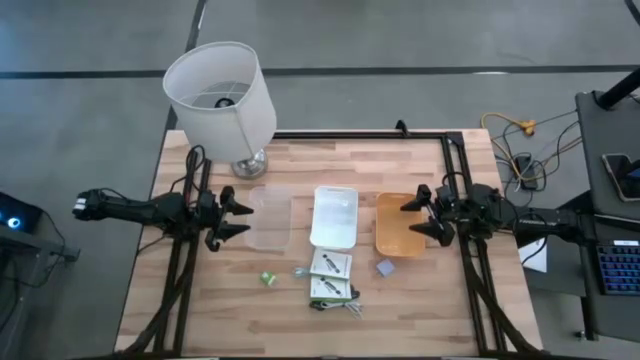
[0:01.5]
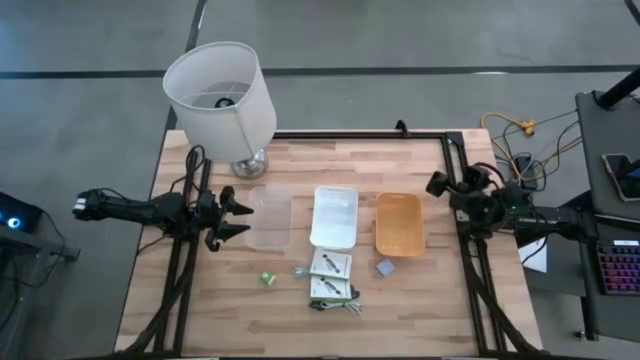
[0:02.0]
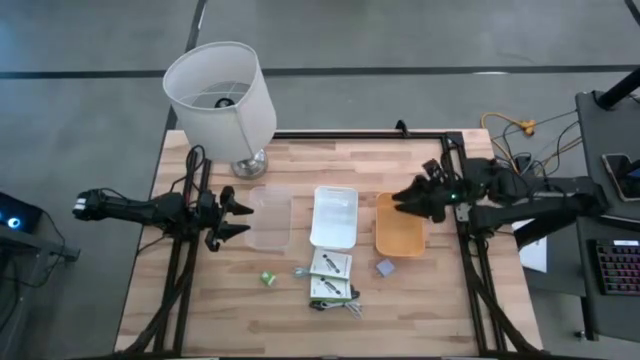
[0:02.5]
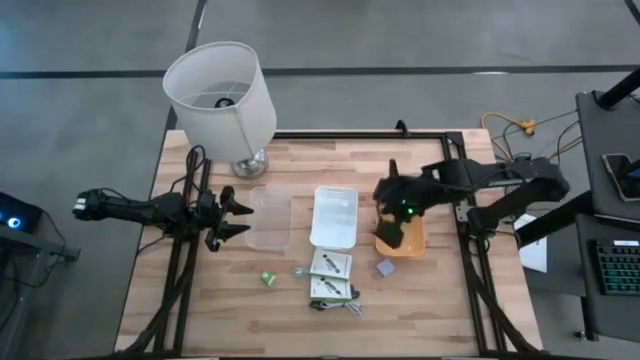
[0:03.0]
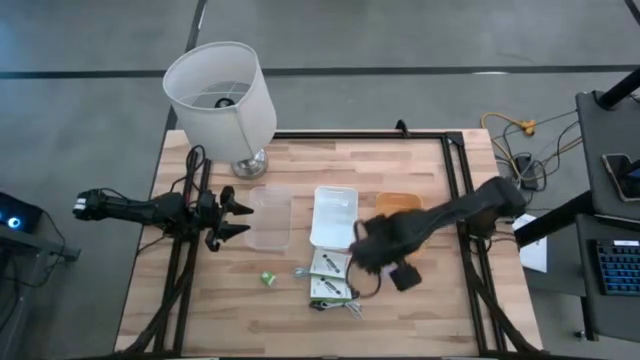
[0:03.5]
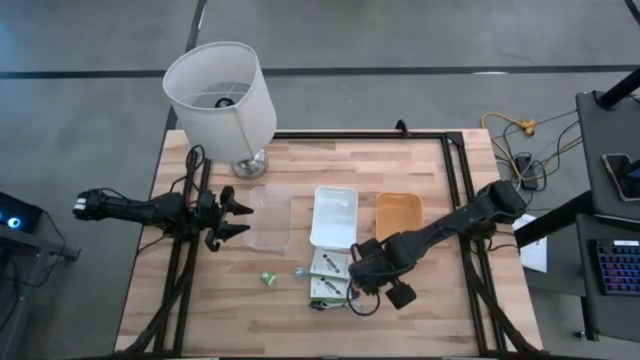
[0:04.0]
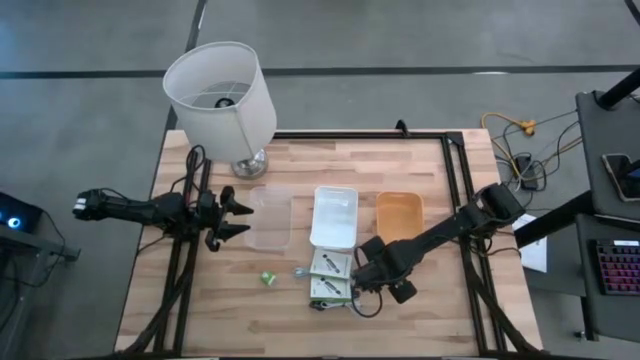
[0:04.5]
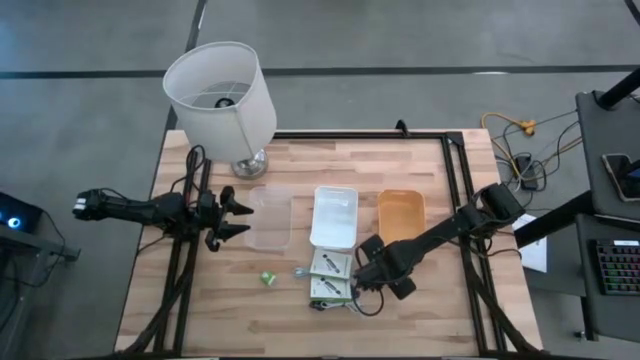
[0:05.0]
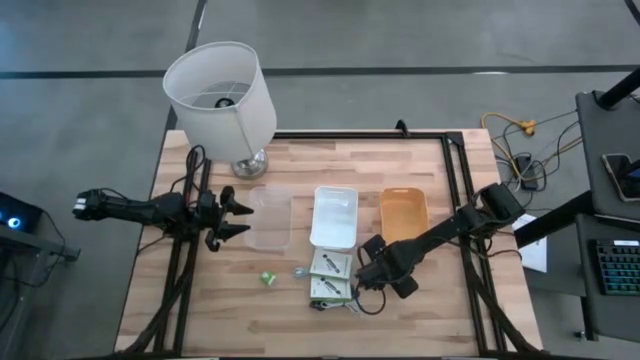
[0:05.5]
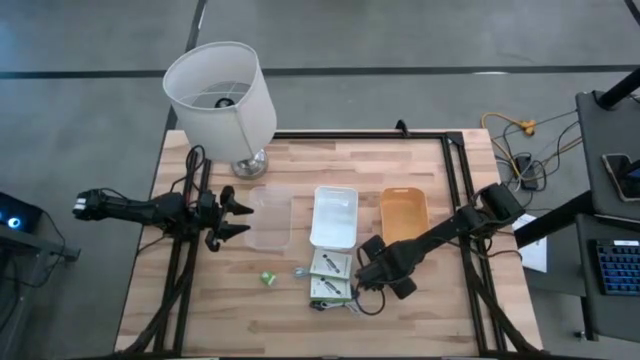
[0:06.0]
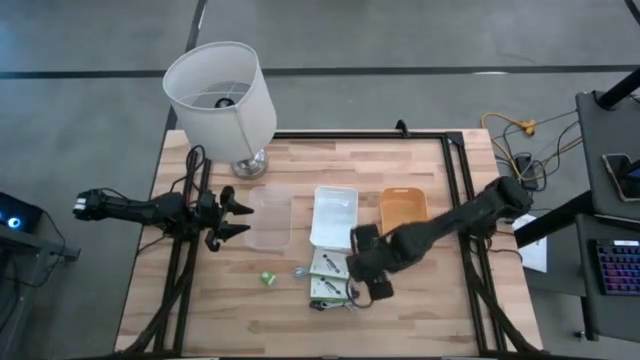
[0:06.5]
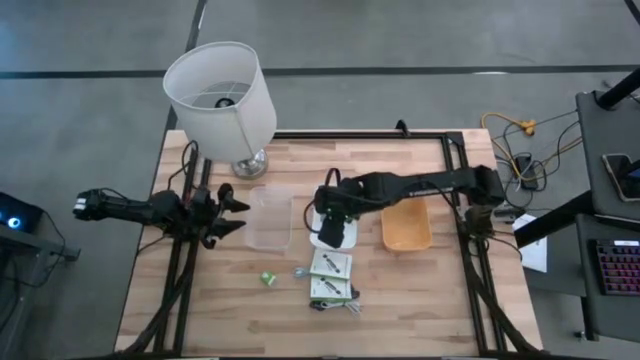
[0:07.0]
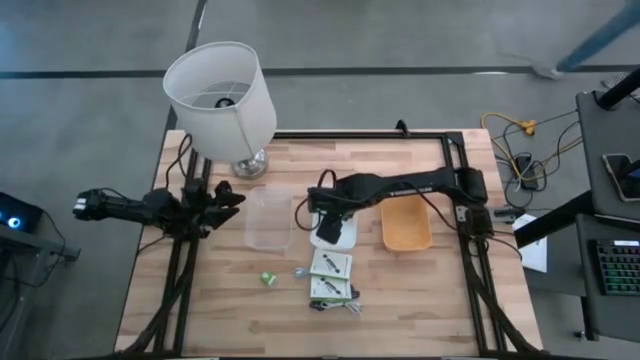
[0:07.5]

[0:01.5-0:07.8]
Task: Pick and place items into bin
Put the white charger adapter into the white bin

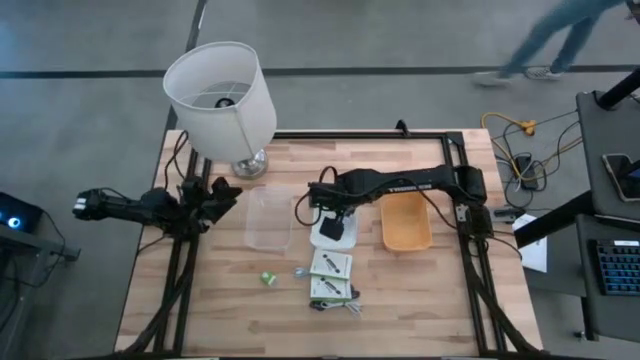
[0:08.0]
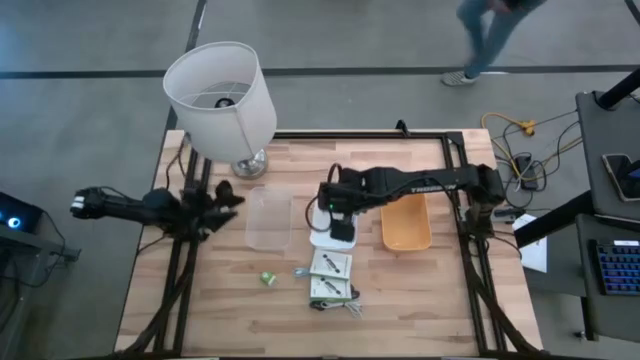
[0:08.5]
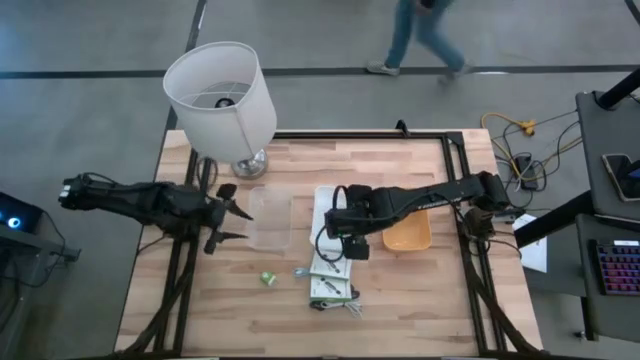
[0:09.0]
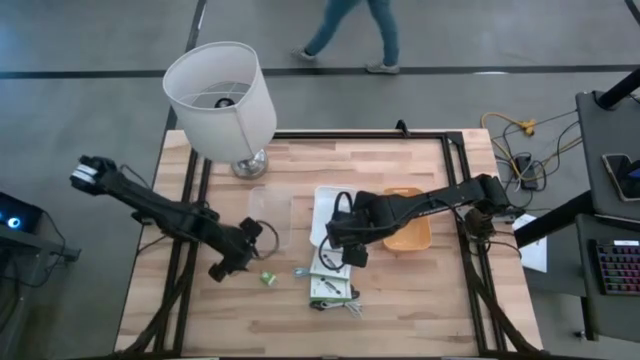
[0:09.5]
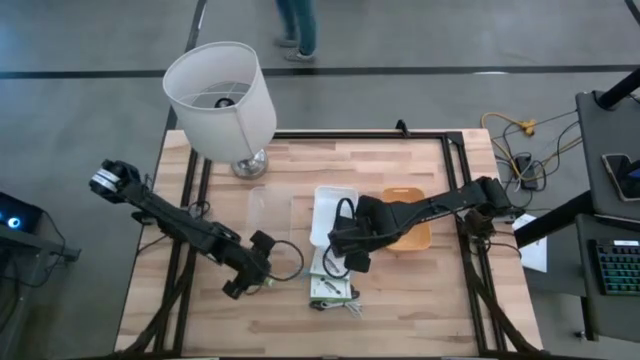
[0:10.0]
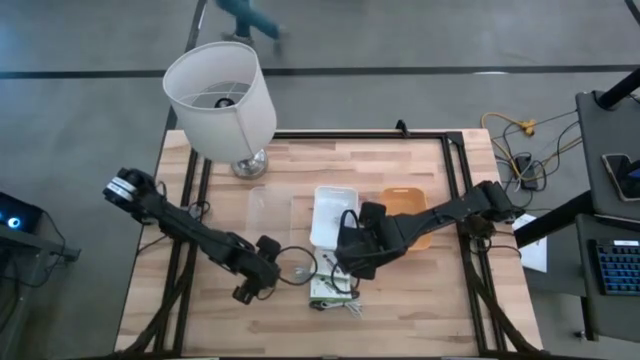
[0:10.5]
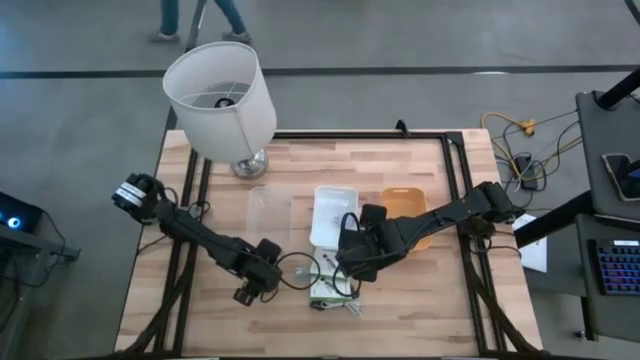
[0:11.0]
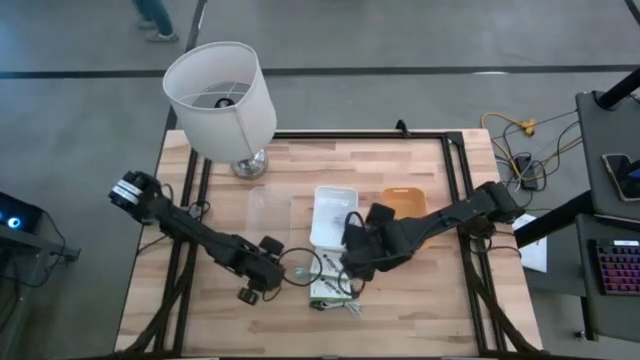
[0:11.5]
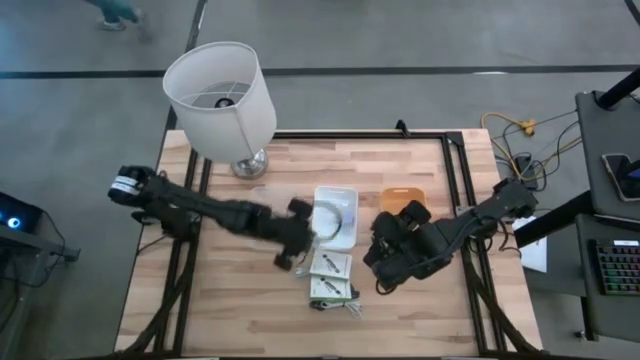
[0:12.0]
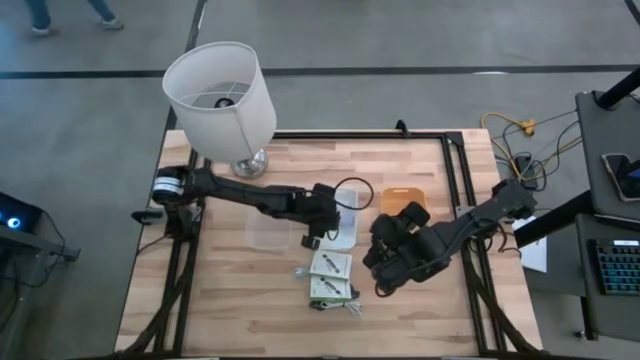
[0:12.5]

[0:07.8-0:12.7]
Put the green charger adapter into the white bin

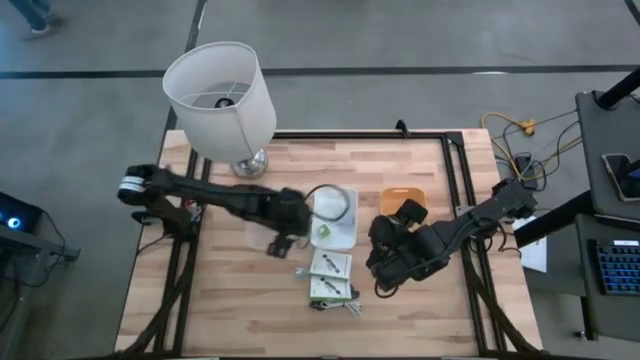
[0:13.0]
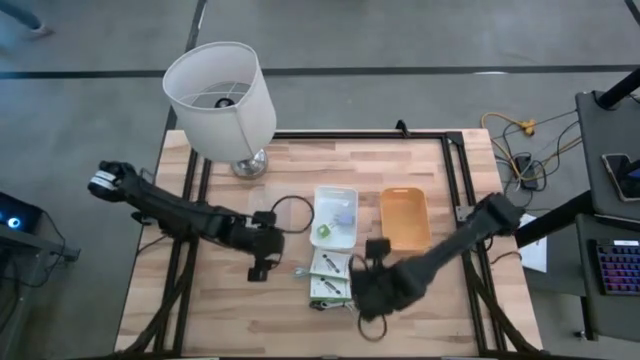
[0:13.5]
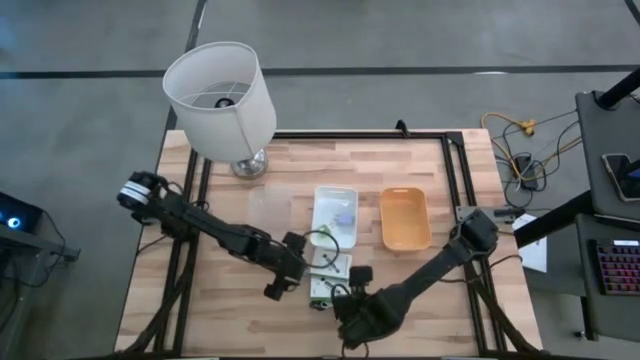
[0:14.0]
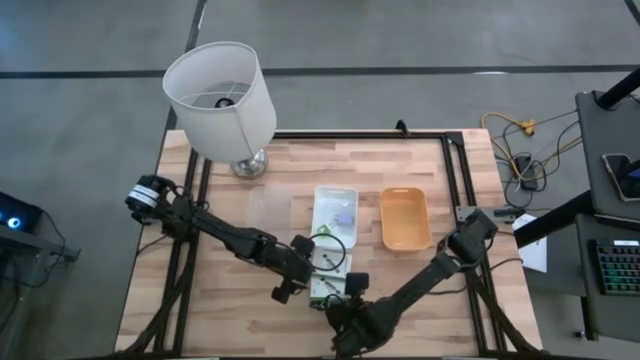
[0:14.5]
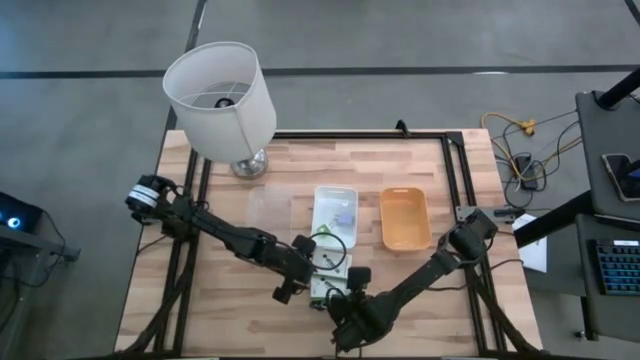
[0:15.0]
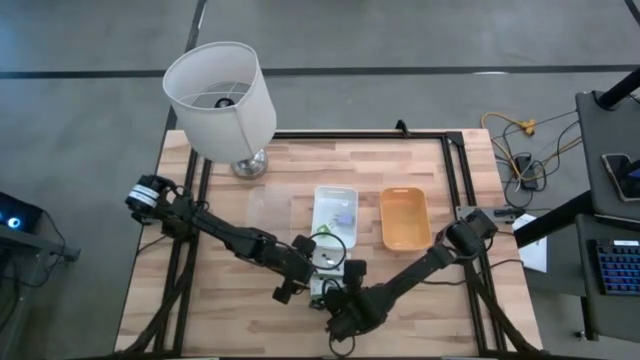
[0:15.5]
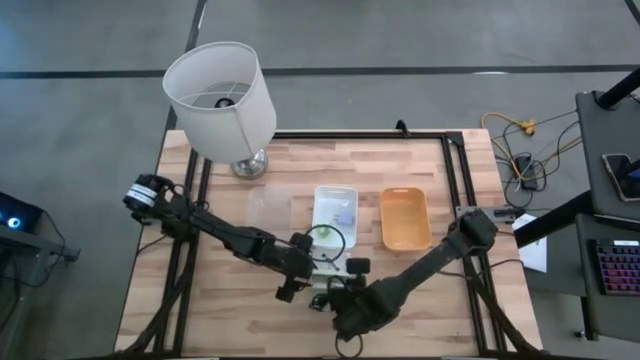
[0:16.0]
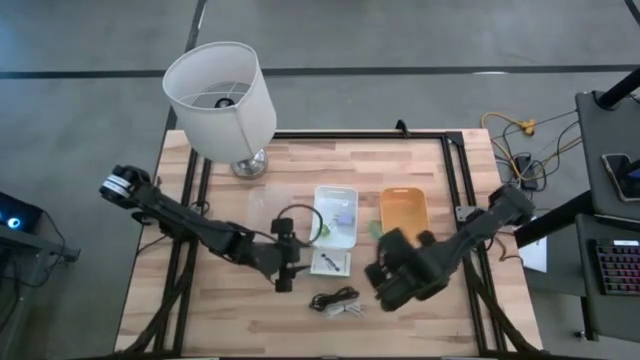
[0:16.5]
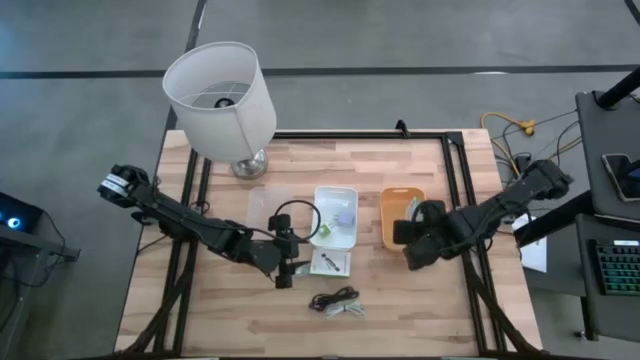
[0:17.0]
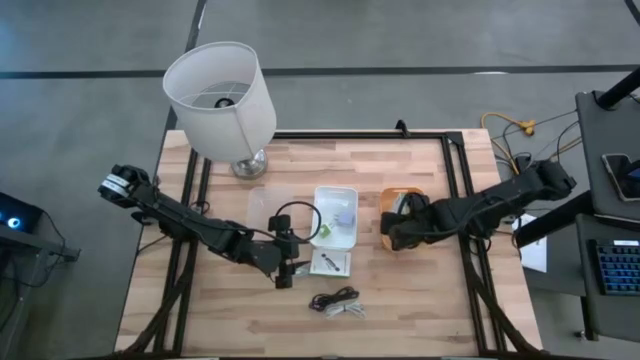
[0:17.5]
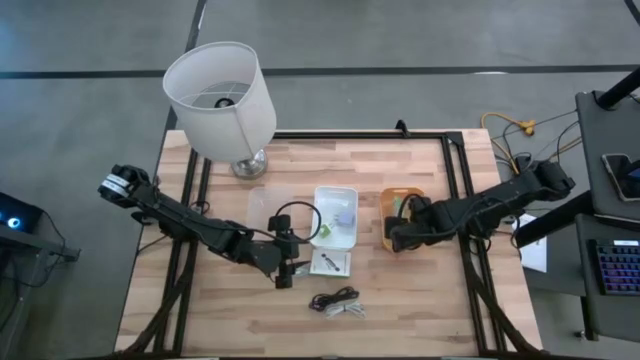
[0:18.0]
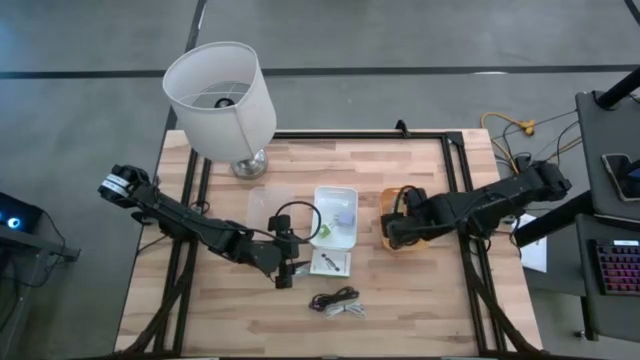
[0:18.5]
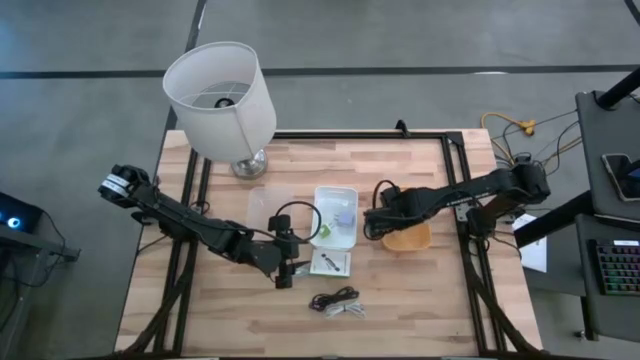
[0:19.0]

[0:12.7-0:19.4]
Put the bottom white card reader box into the yellow bin

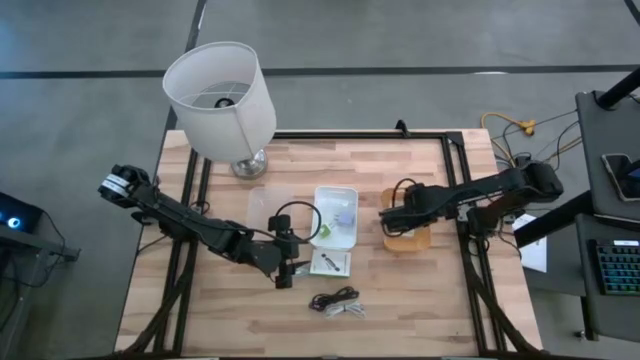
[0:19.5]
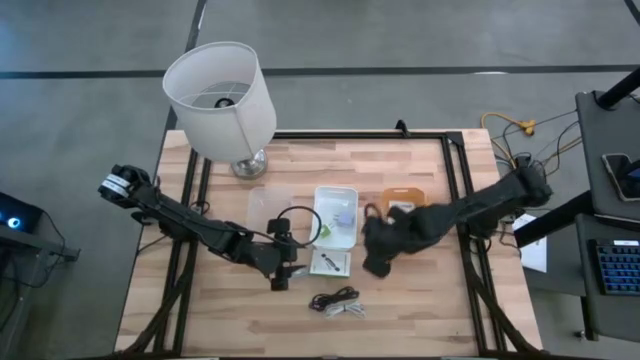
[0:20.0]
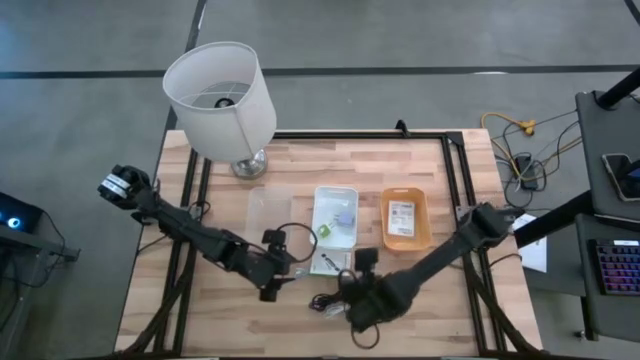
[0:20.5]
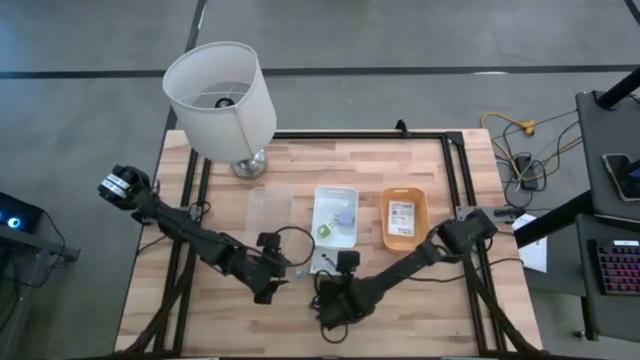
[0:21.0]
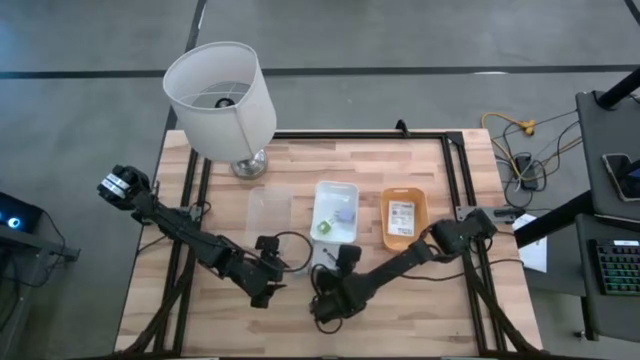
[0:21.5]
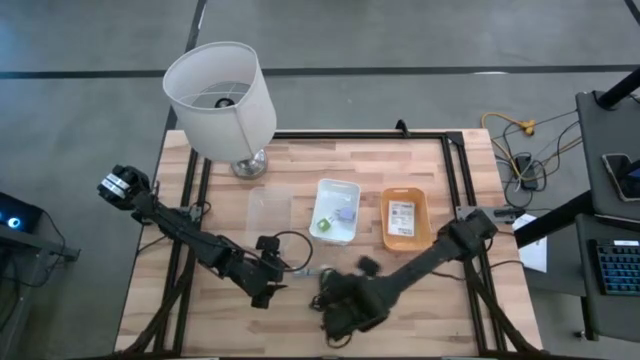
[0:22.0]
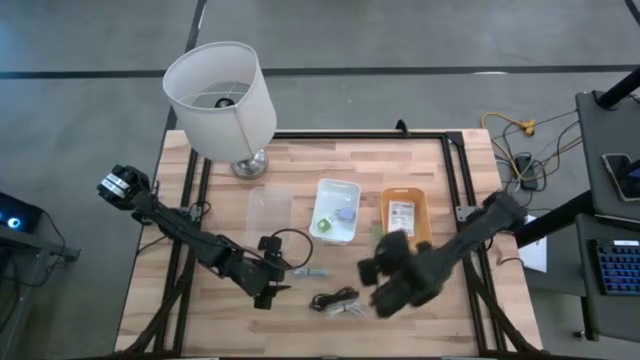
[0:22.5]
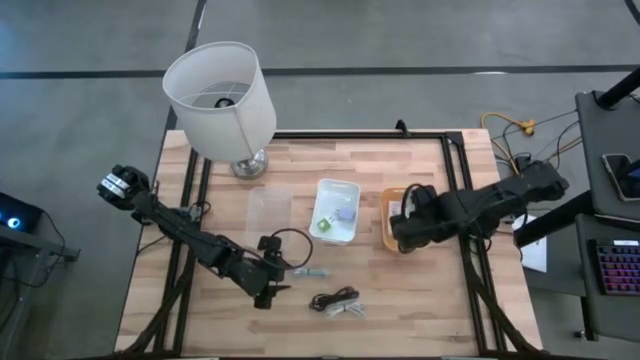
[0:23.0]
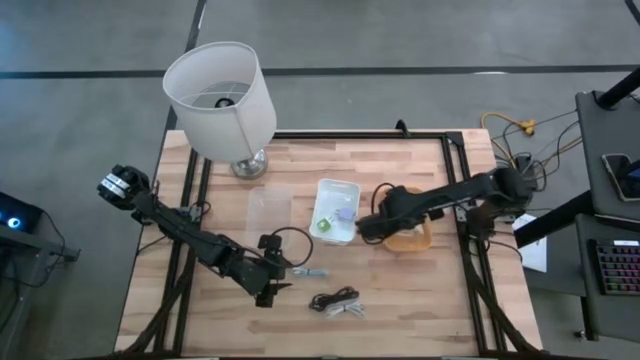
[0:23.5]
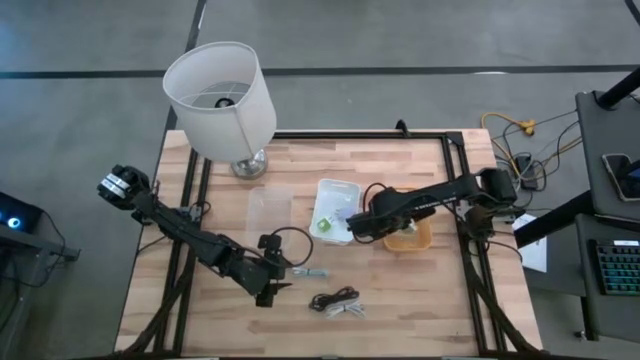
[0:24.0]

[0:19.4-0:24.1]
Put the white card reader box into the yellow bin
